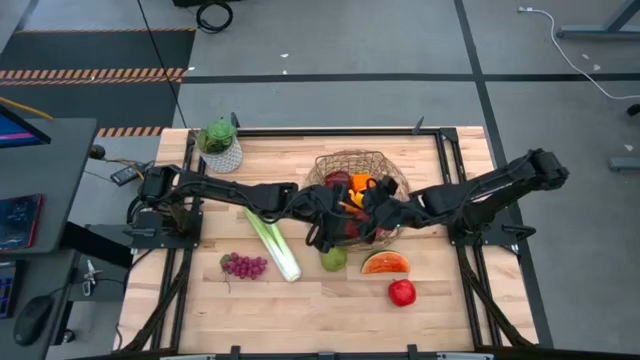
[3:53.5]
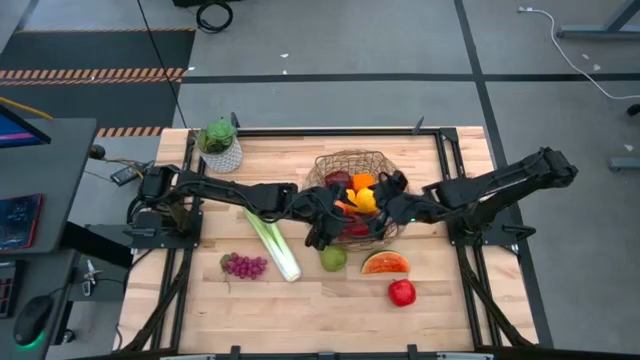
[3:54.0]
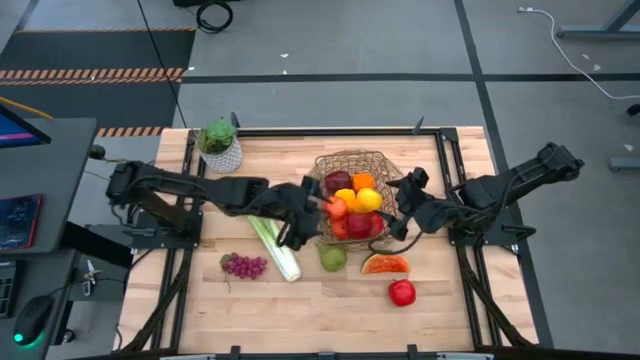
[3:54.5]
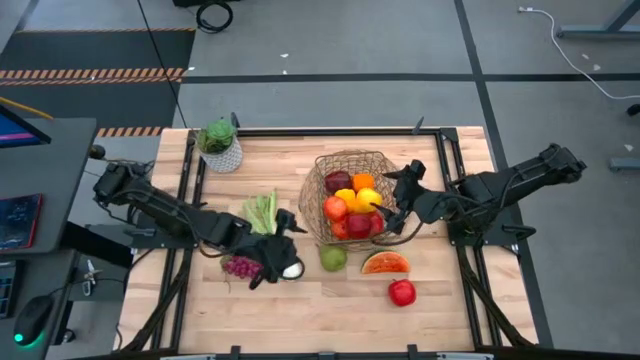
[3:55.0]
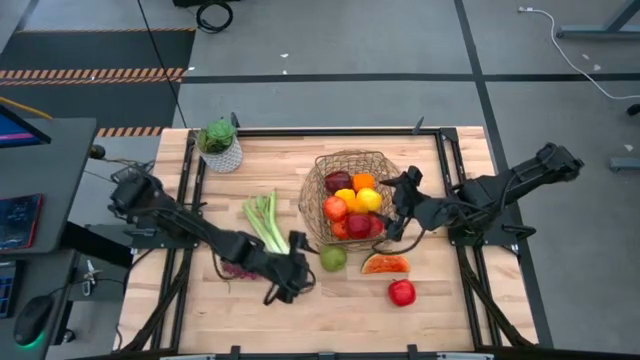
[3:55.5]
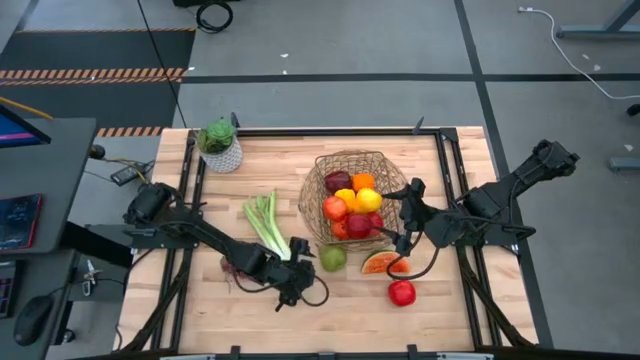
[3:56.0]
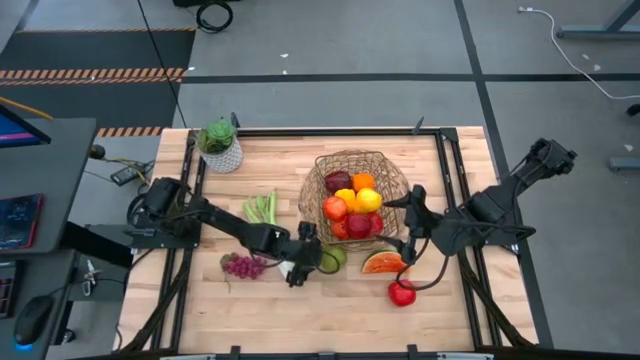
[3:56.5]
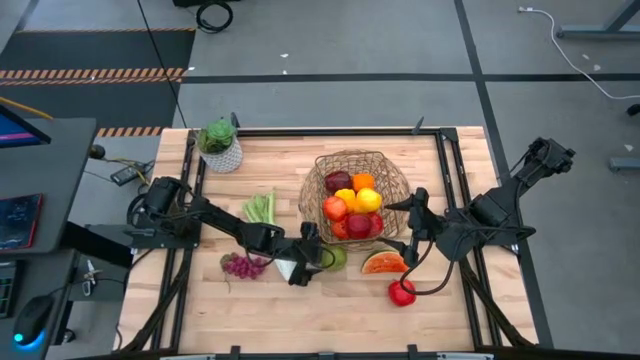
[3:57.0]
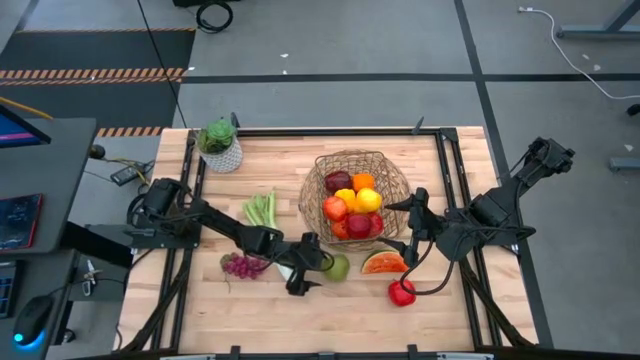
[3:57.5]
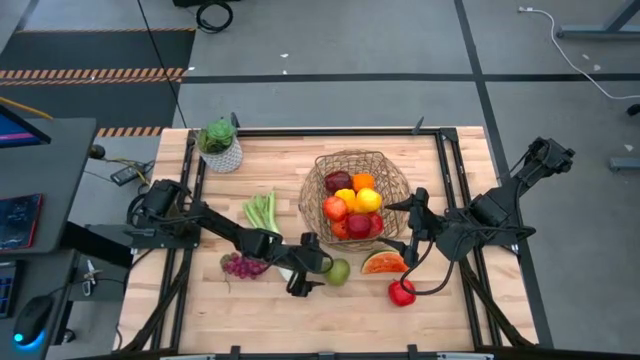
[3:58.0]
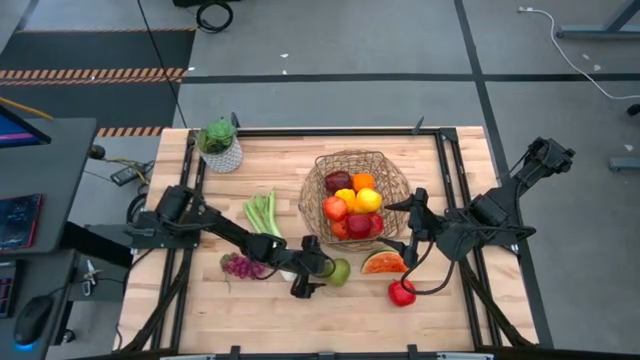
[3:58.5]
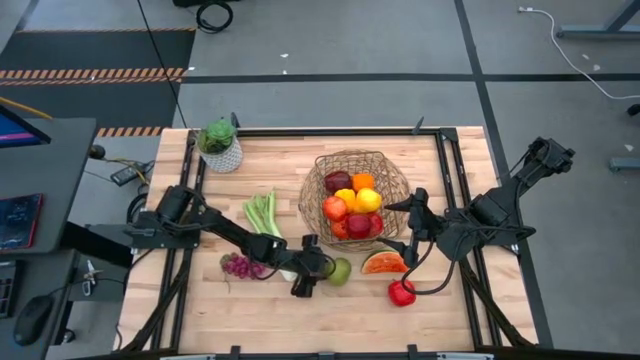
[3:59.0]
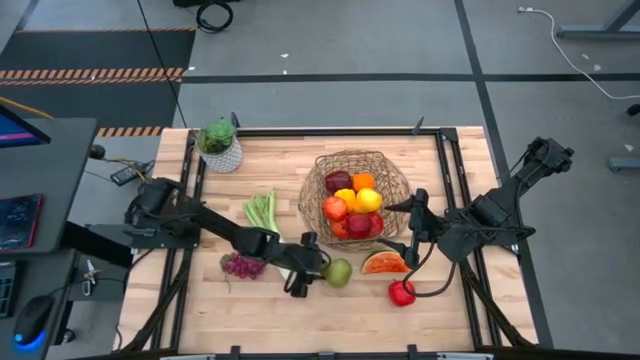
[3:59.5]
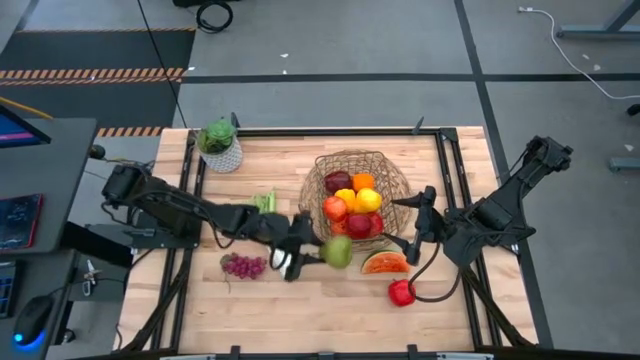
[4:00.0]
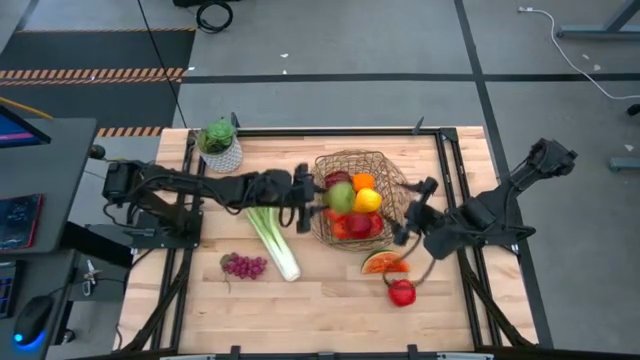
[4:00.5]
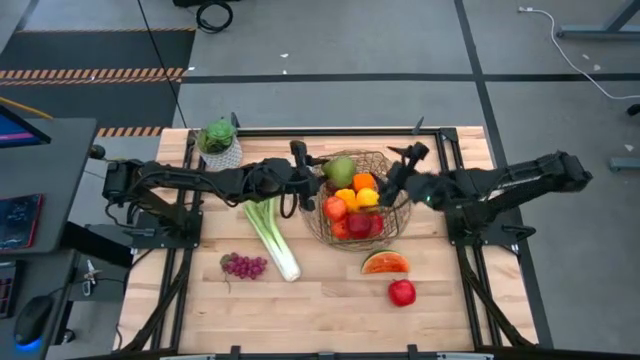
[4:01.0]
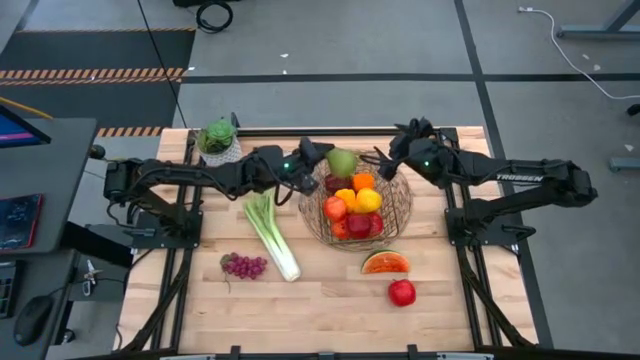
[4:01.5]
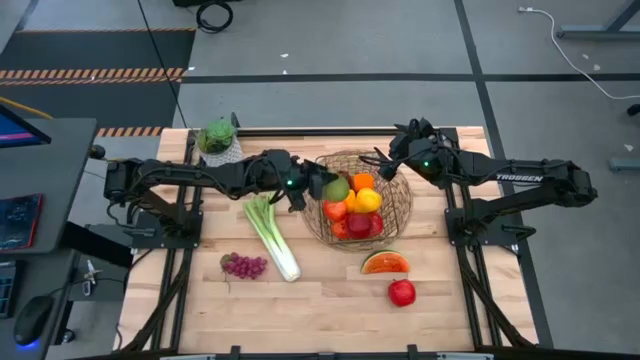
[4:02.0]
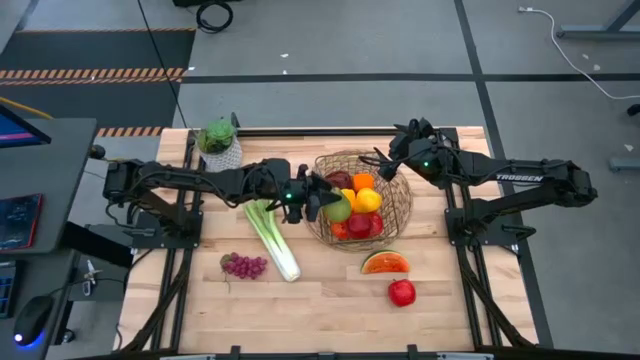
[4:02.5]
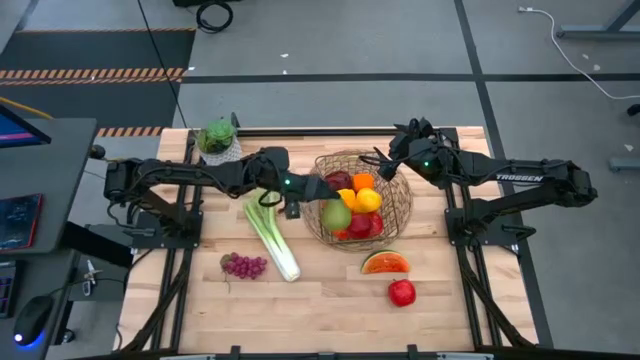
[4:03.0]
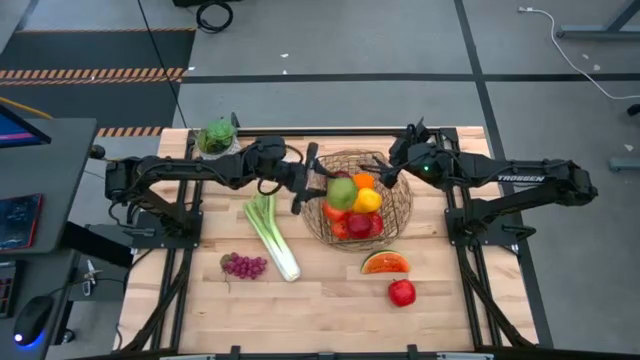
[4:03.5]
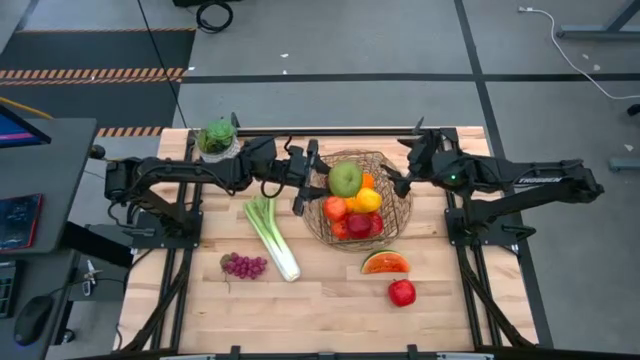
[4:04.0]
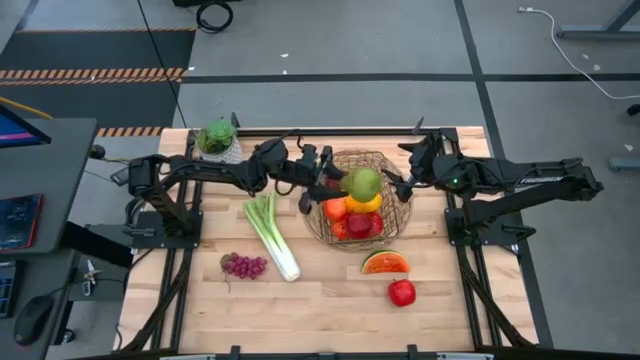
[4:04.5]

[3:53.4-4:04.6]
Task: Build produce basket
Put the green pear into the brown wire basket

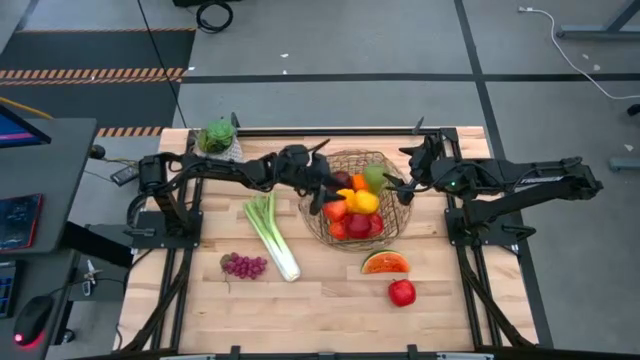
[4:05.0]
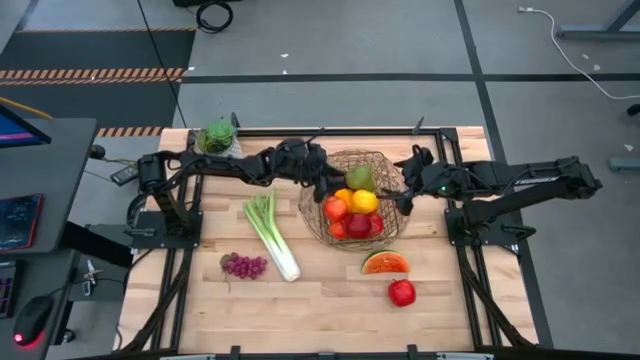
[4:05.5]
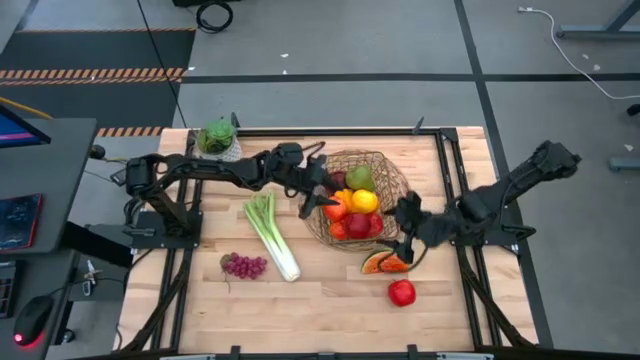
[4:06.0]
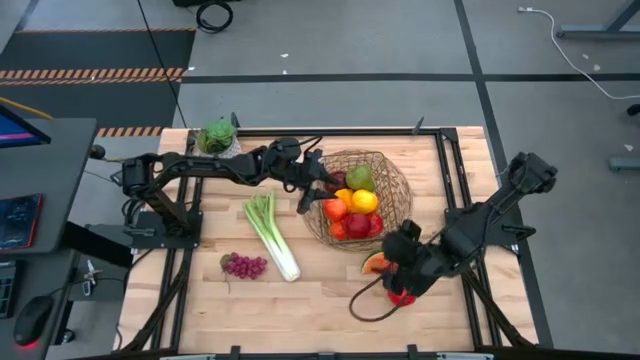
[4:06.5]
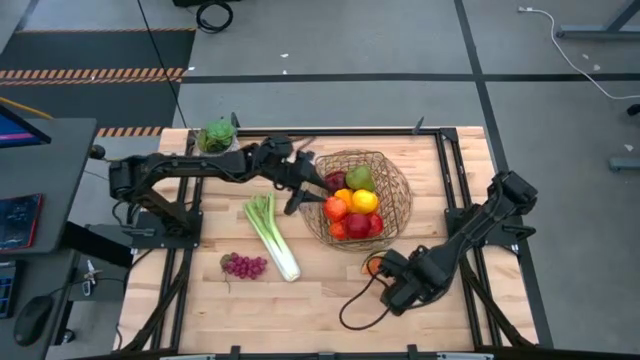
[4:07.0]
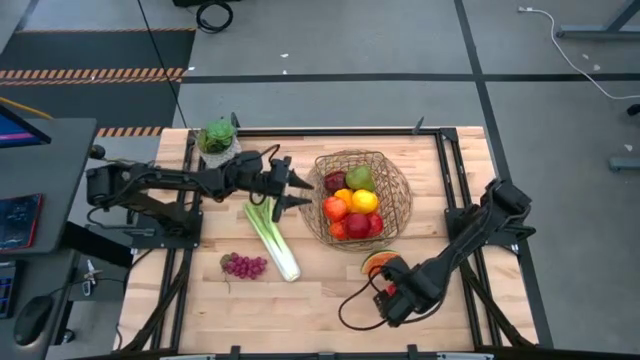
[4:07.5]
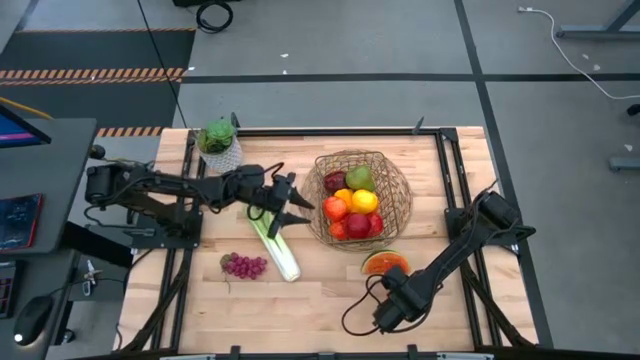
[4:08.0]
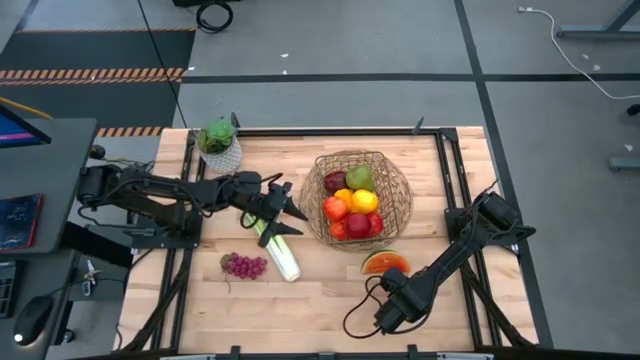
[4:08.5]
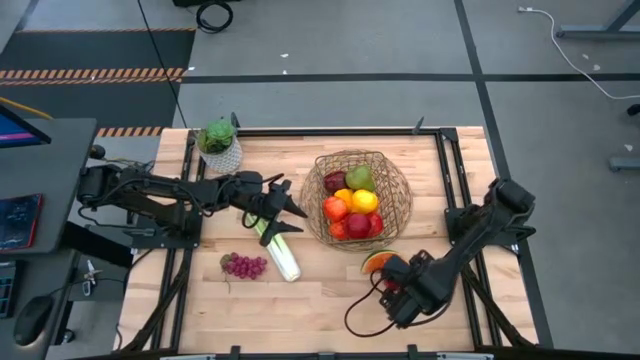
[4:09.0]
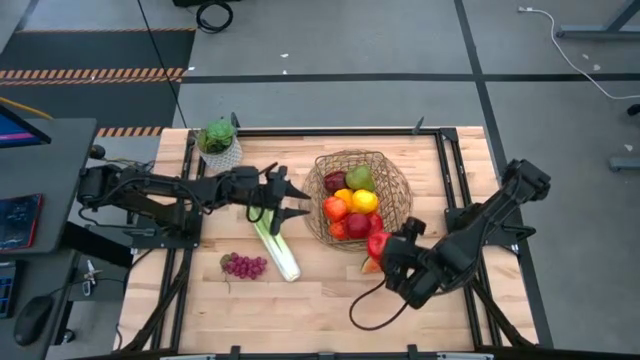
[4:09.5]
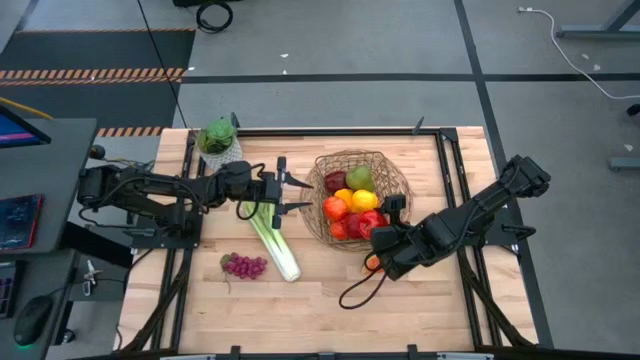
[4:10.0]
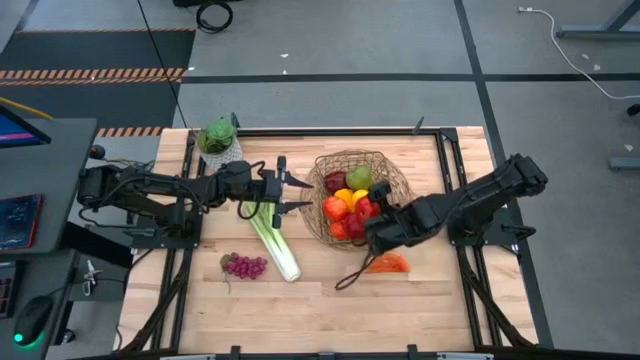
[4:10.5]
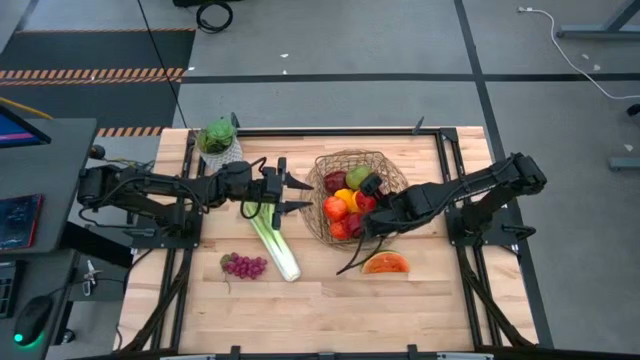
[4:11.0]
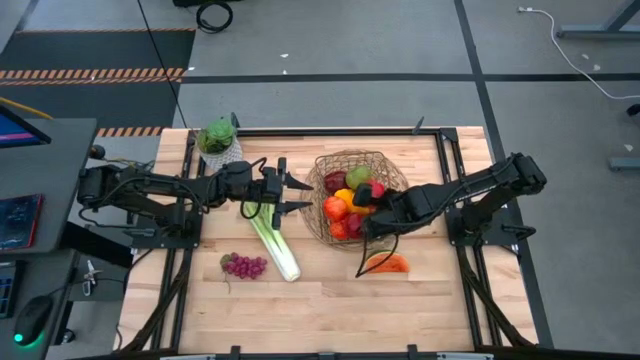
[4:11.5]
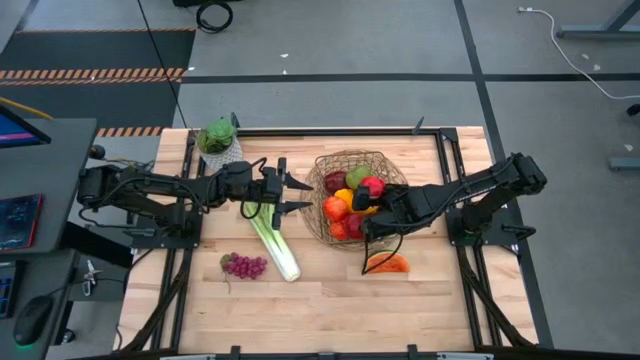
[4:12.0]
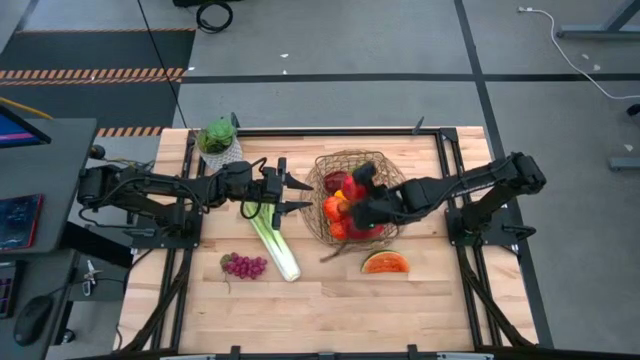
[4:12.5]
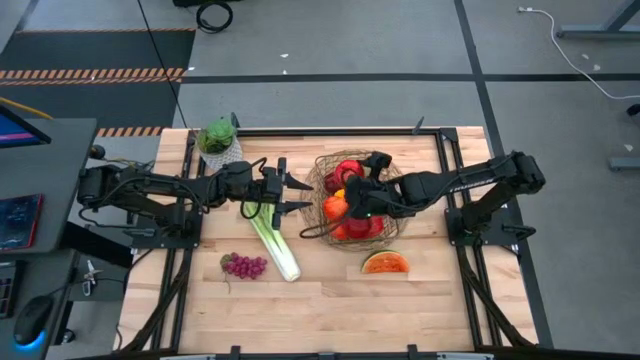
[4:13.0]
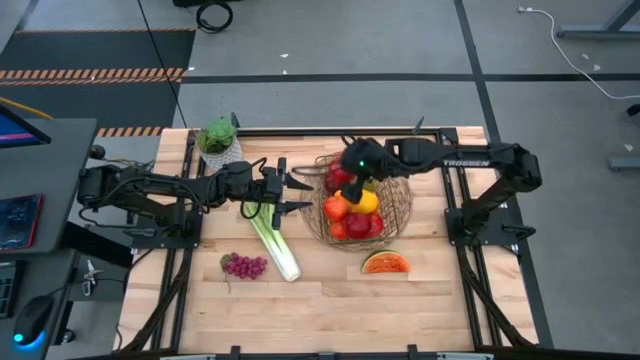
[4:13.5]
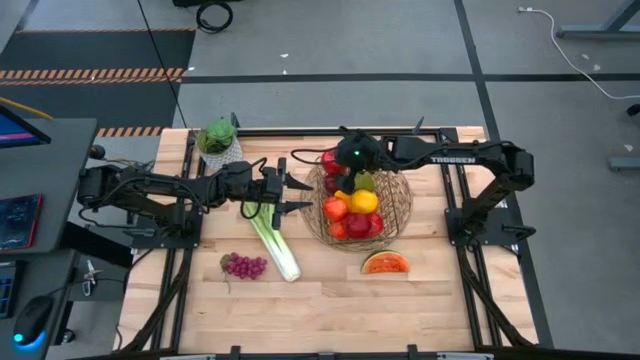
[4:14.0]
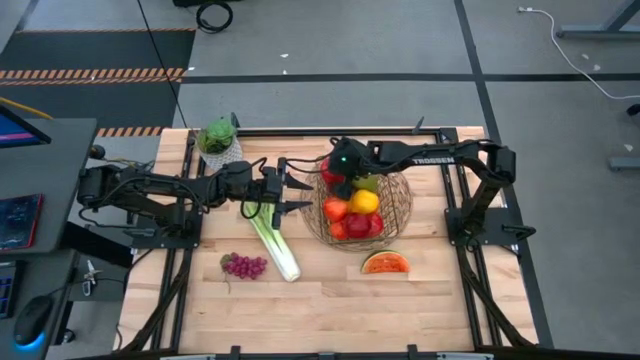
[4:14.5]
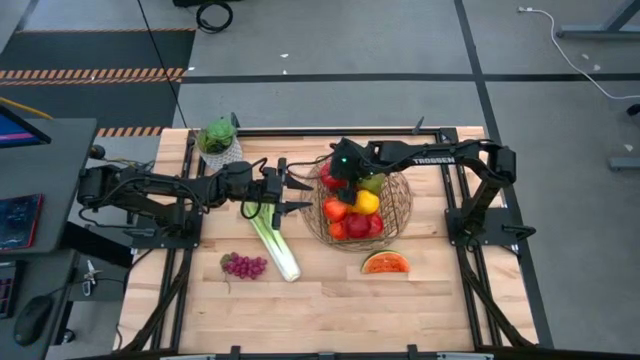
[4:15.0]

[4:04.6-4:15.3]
Put the red apple into the brown wire basket
